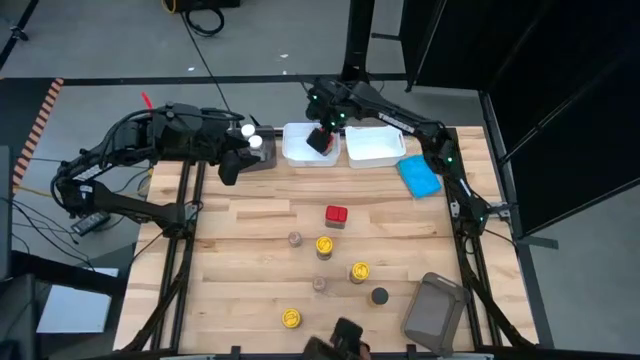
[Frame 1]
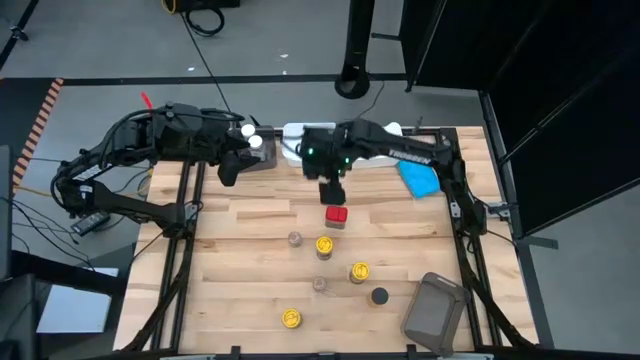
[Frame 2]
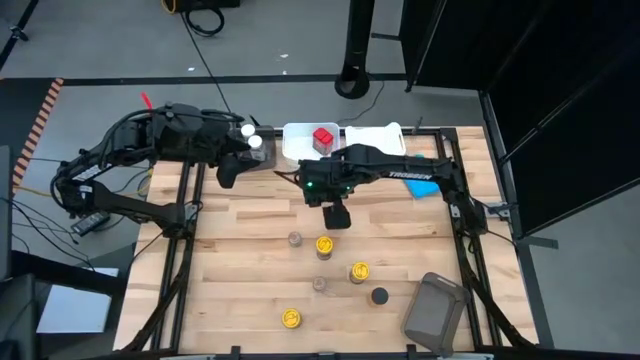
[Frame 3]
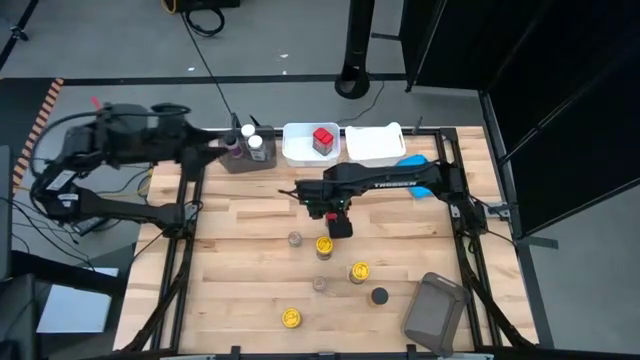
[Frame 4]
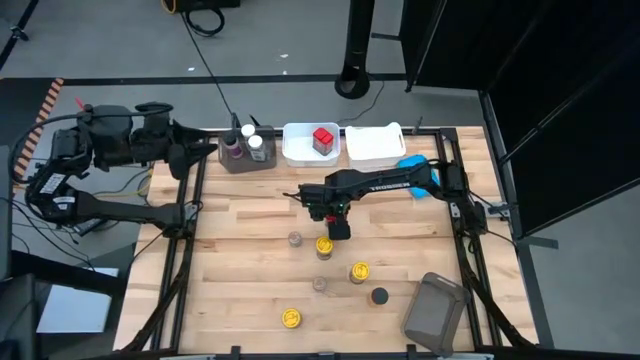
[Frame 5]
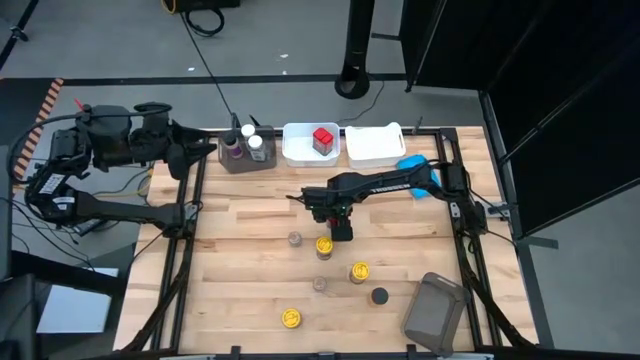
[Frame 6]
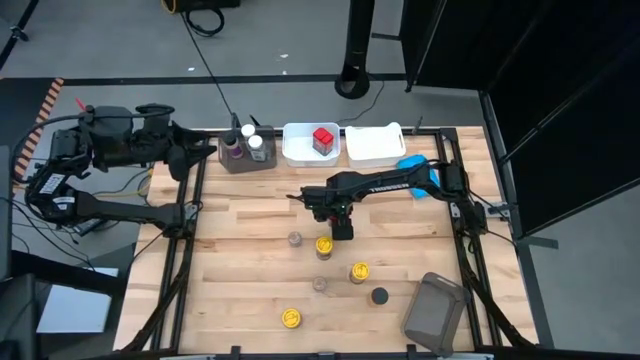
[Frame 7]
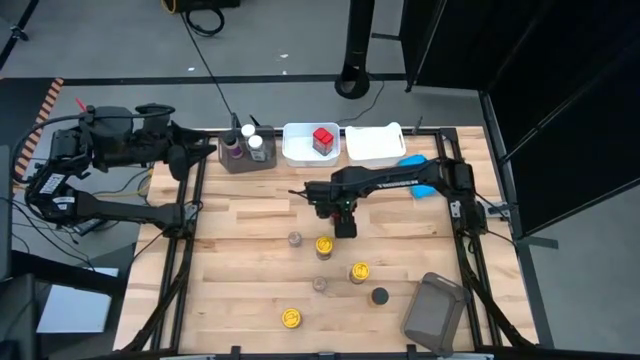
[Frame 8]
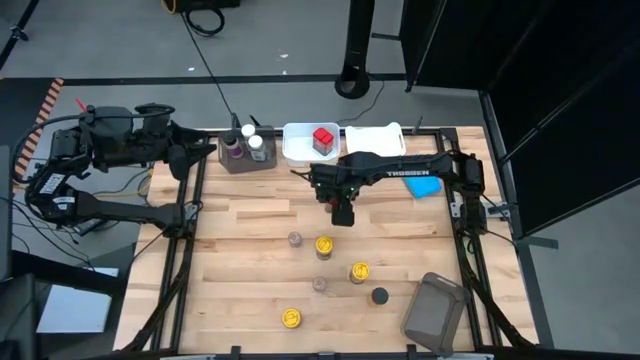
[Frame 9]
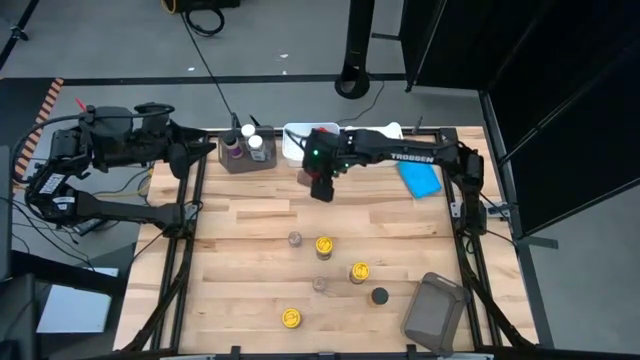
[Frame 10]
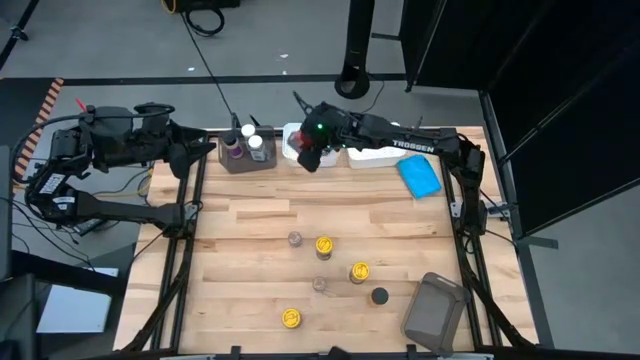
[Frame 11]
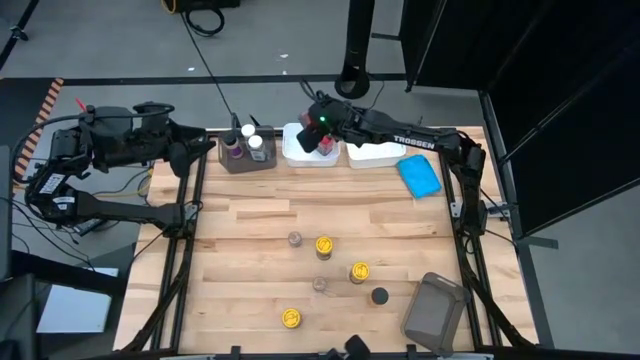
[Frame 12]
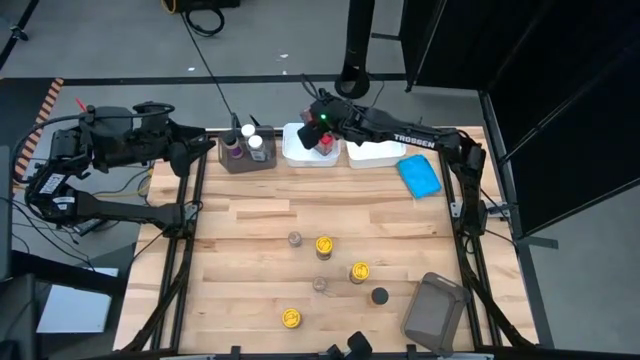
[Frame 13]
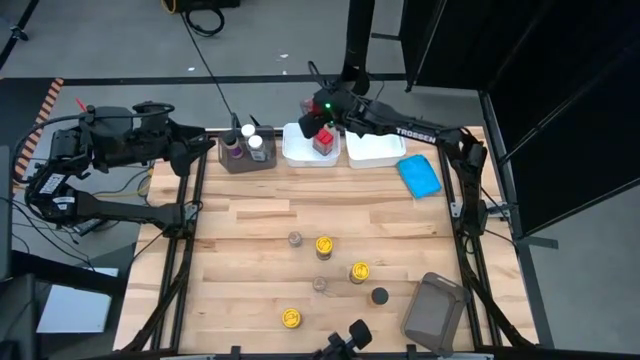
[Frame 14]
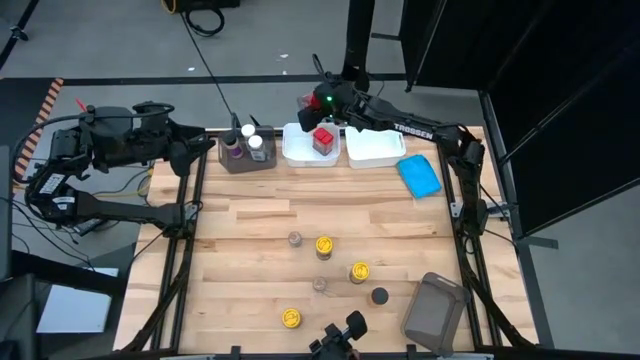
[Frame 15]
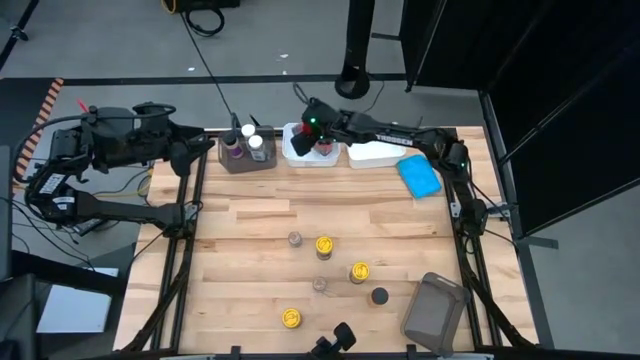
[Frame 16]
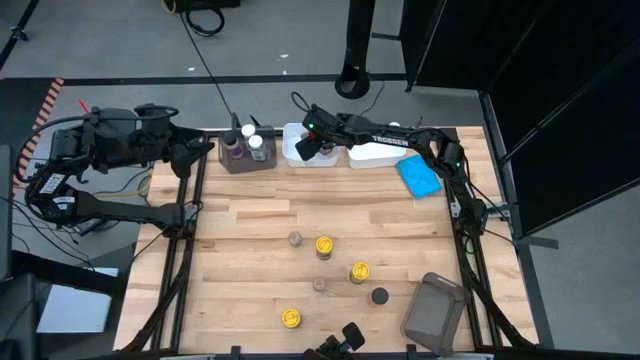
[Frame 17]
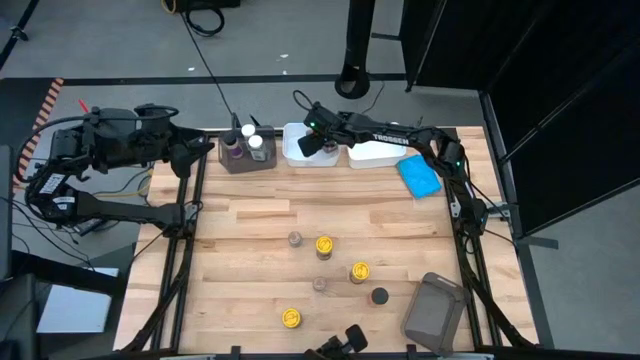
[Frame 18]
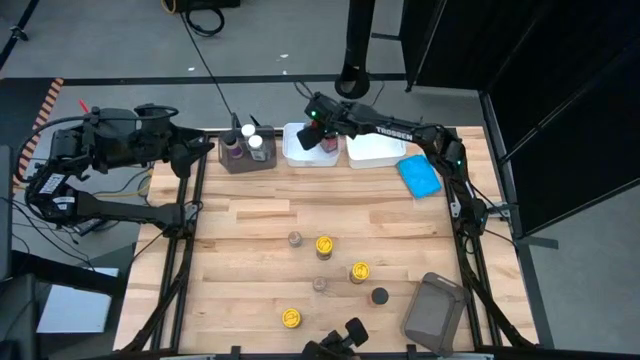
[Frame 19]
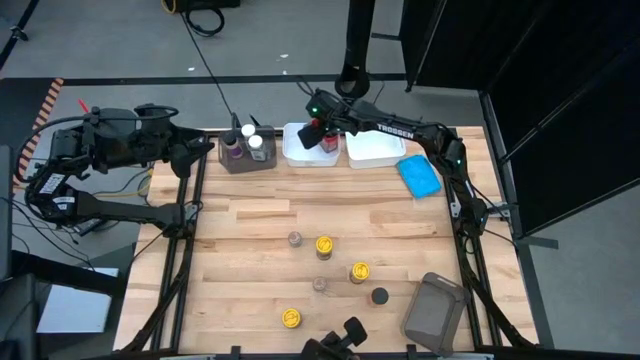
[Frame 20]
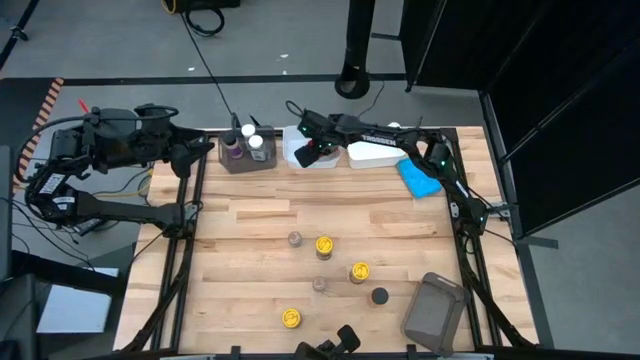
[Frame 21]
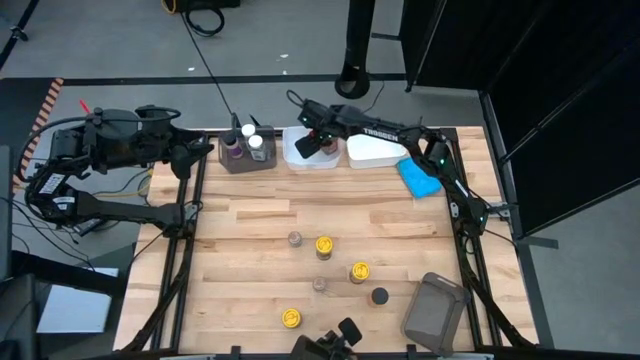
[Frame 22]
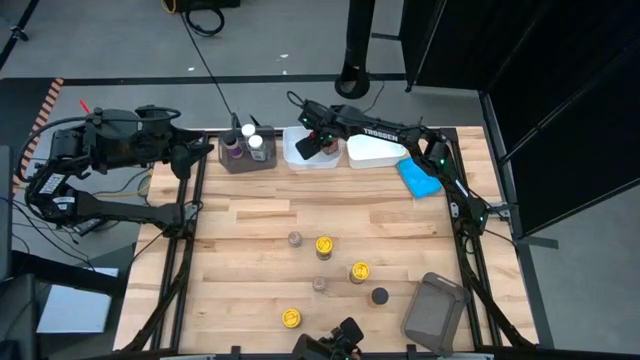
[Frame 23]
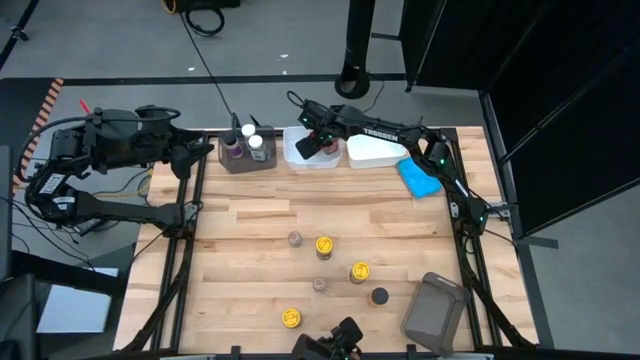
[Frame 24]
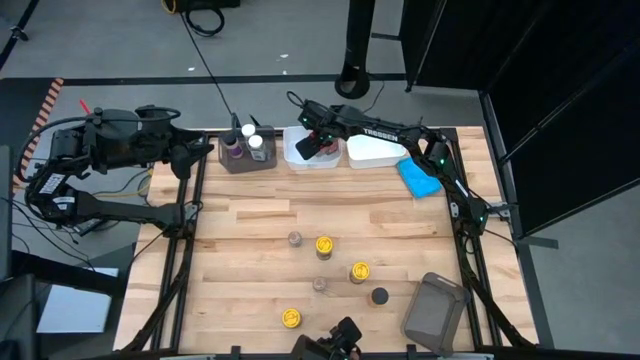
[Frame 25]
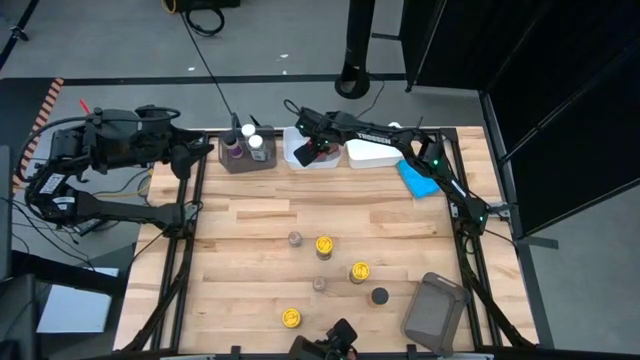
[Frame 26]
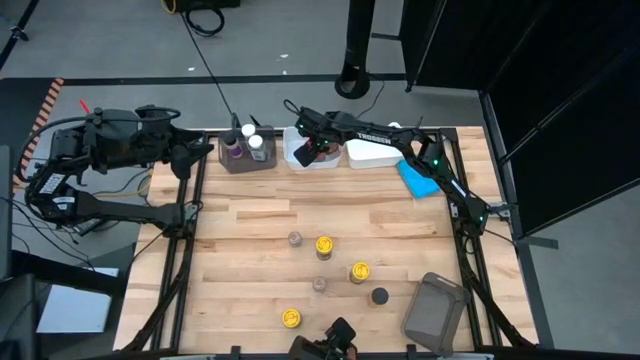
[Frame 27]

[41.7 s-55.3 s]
Task: Sort spices by type
Put the red seasoning bottle into the left white bin

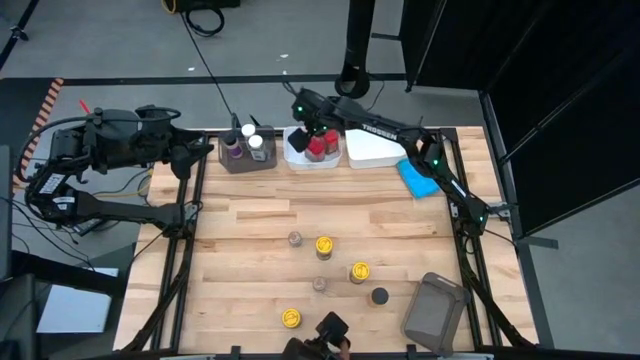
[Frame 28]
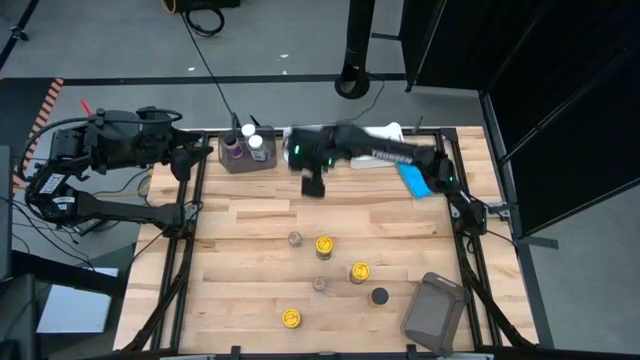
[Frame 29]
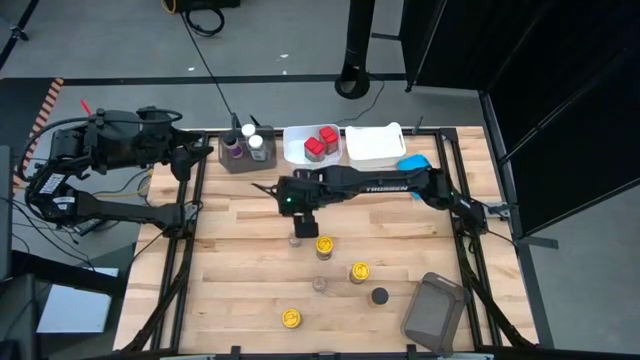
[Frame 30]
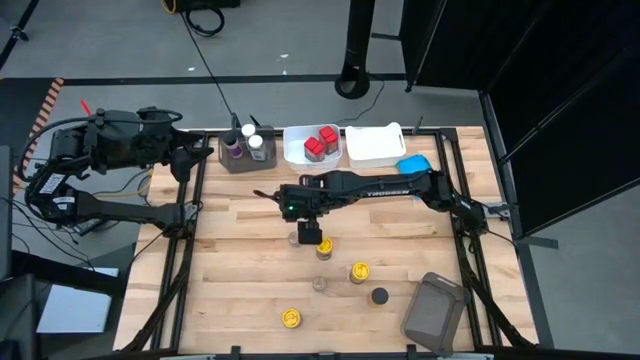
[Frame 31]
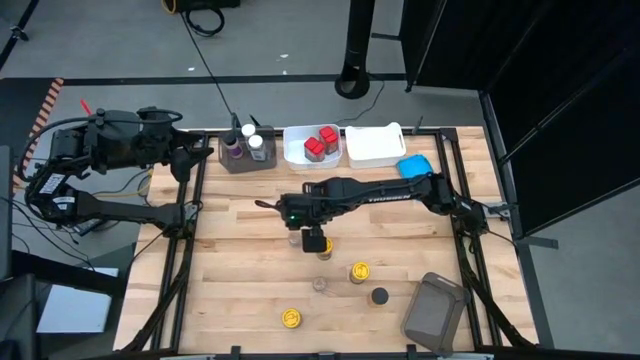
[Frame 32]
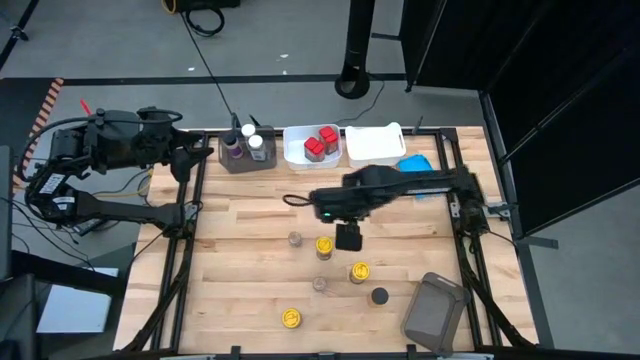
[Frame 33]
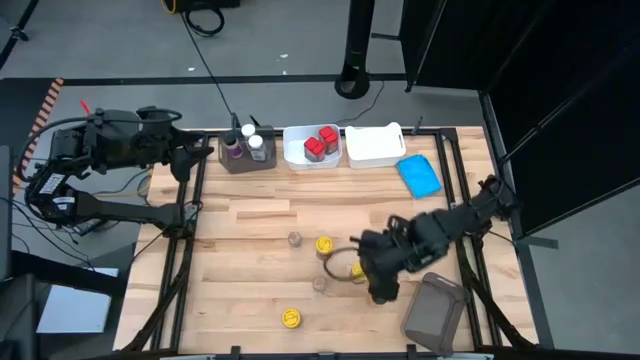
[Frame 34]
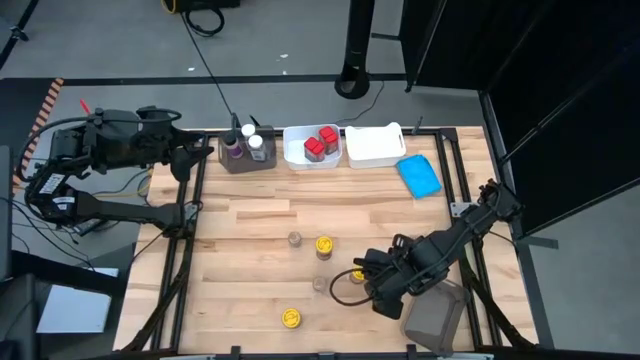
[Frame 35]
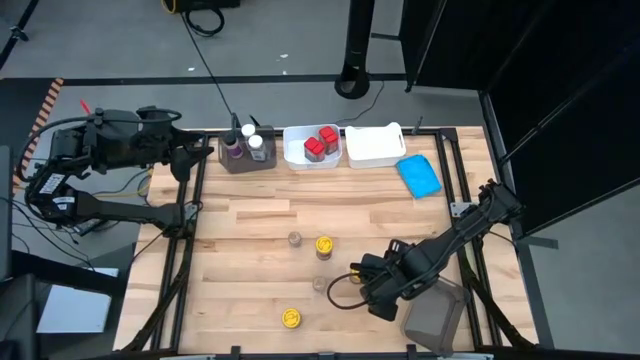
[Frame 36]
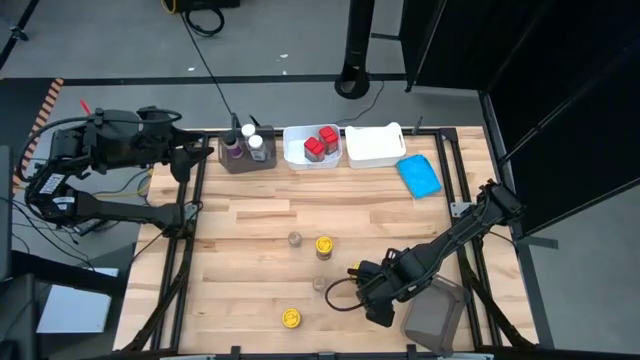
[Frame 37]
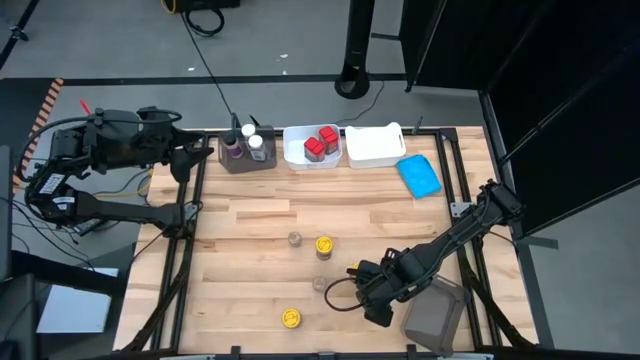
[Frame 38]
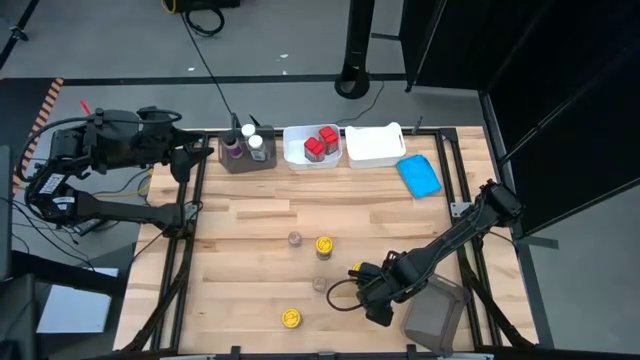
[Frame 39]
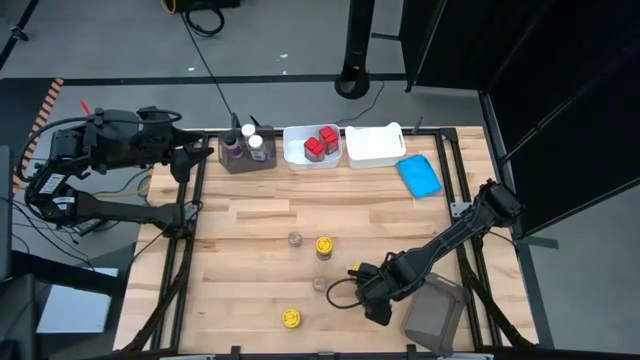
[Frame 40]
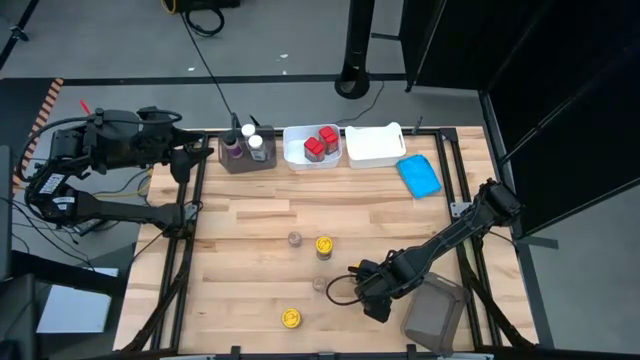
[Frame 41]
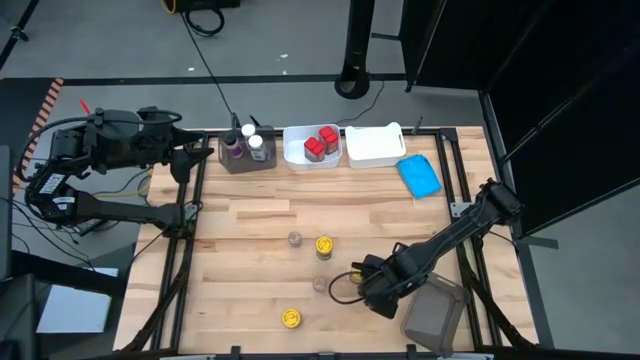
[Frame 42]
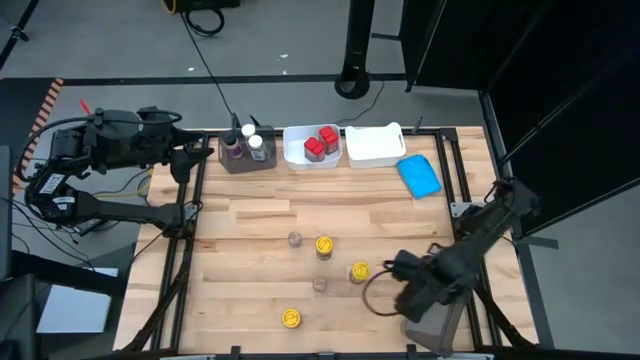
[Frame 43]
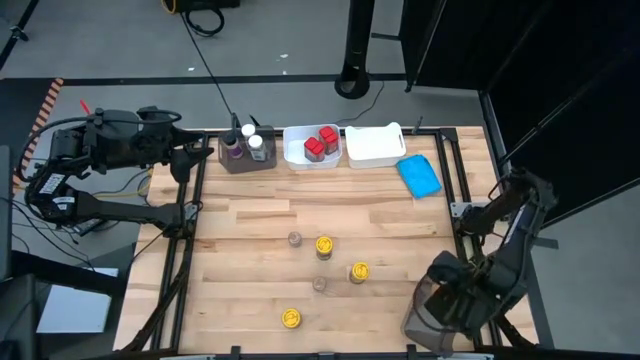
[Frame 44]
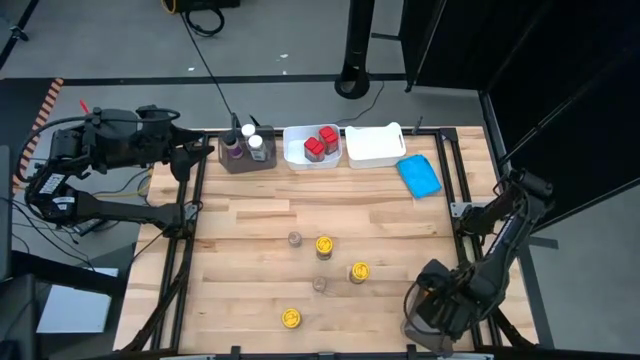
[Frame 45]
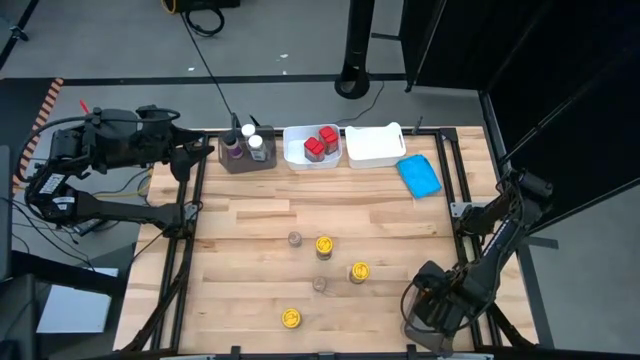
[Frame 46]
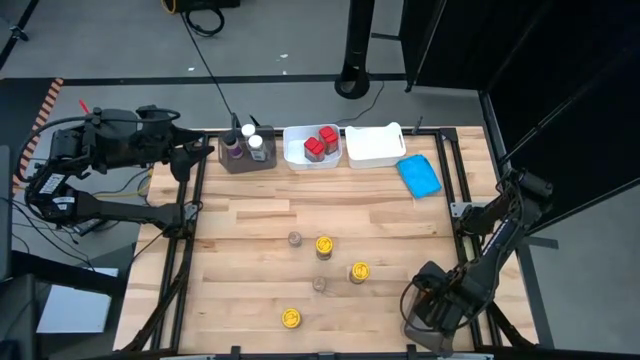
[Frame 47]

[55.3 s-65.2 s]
Put the orange seasoning bottle into the bottom black bin
